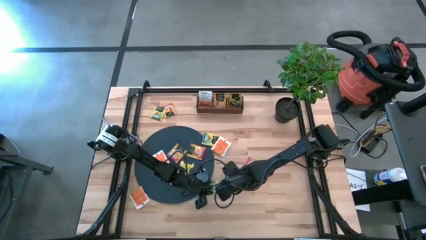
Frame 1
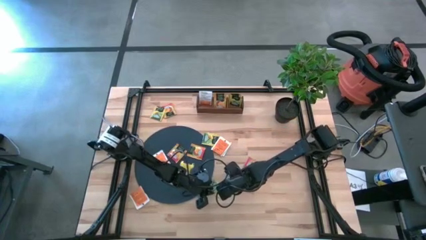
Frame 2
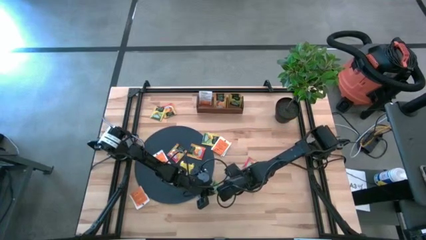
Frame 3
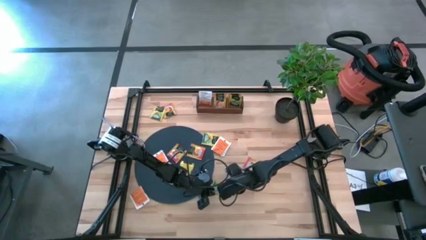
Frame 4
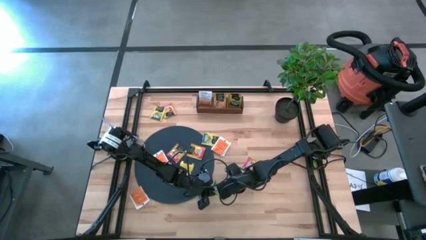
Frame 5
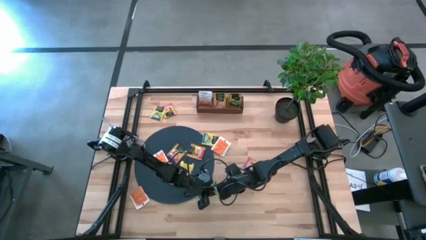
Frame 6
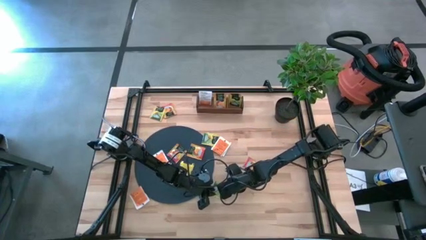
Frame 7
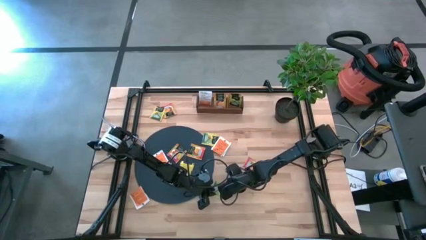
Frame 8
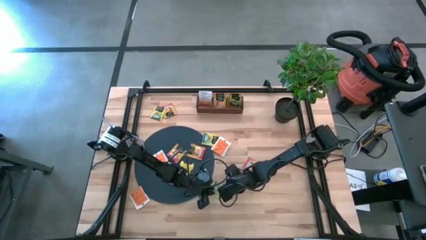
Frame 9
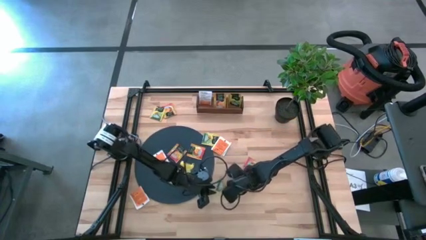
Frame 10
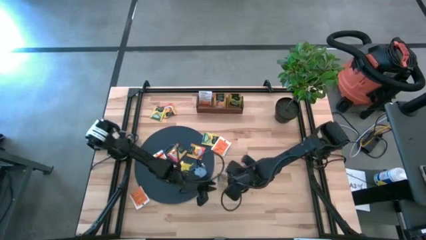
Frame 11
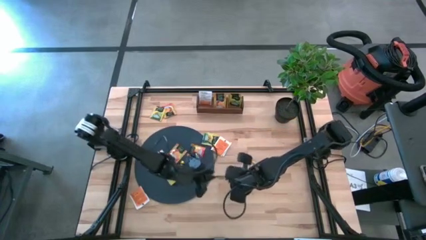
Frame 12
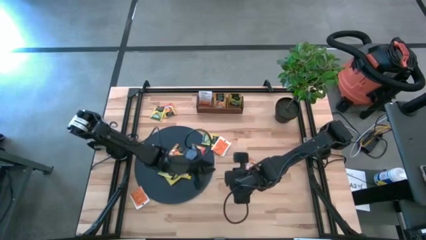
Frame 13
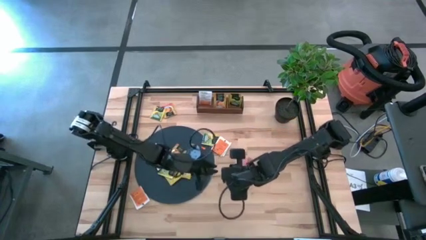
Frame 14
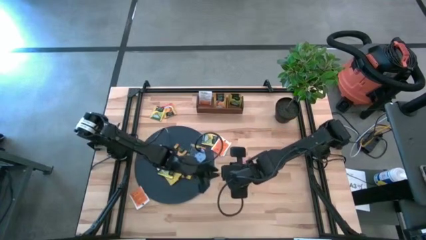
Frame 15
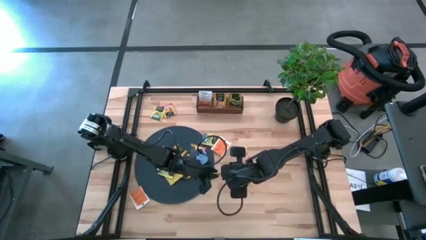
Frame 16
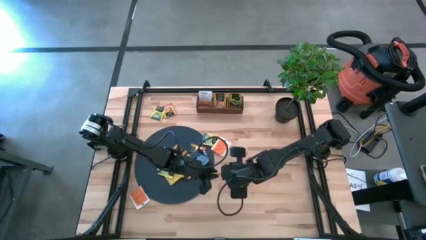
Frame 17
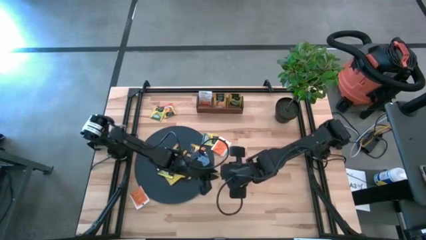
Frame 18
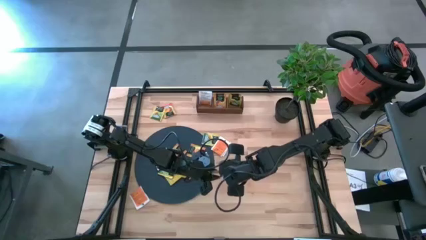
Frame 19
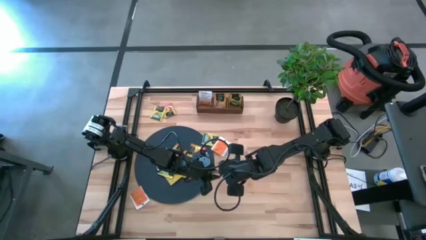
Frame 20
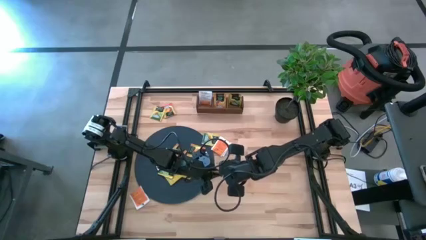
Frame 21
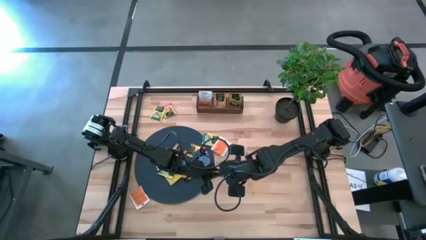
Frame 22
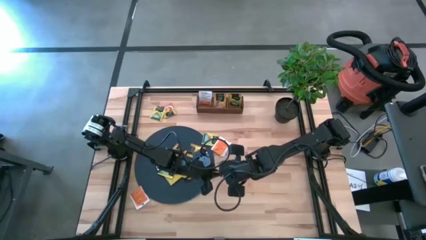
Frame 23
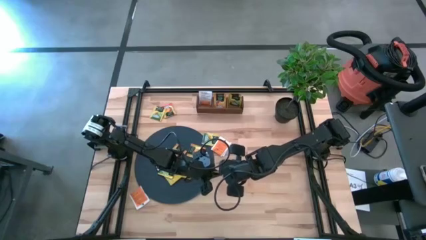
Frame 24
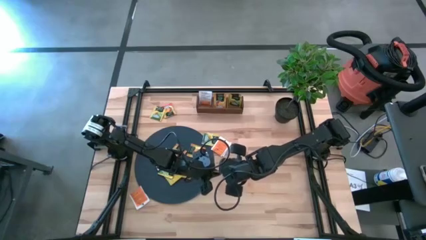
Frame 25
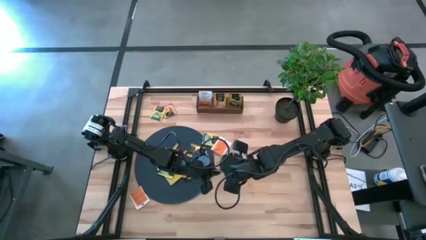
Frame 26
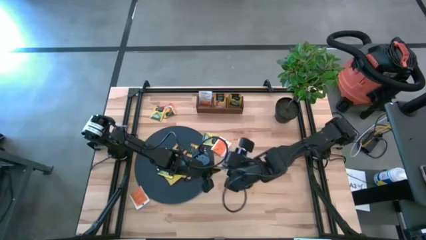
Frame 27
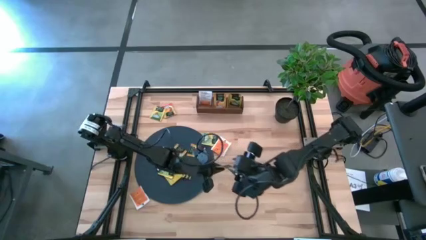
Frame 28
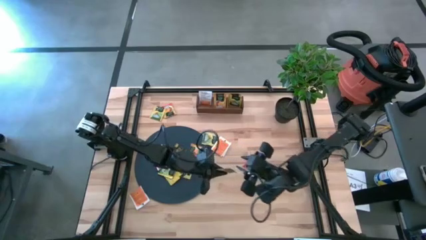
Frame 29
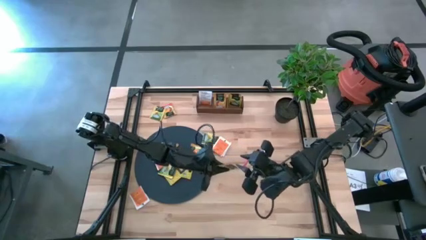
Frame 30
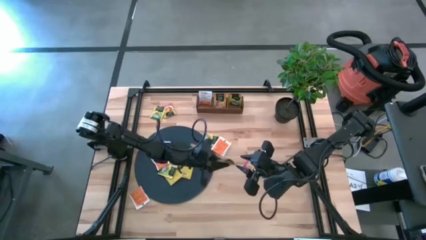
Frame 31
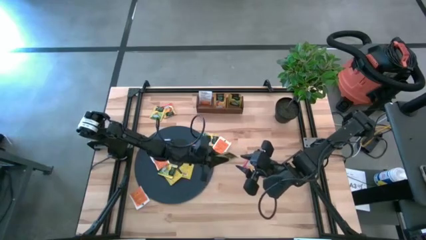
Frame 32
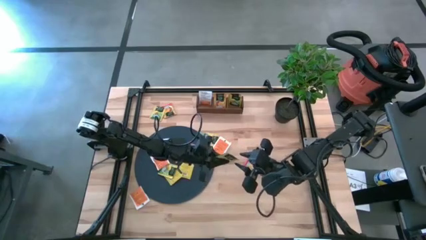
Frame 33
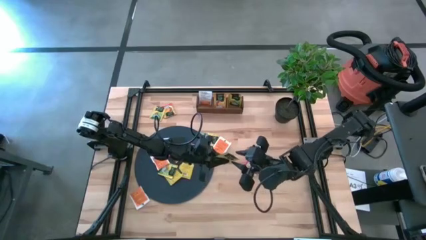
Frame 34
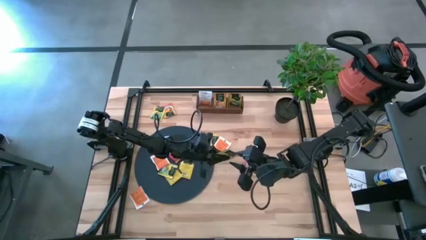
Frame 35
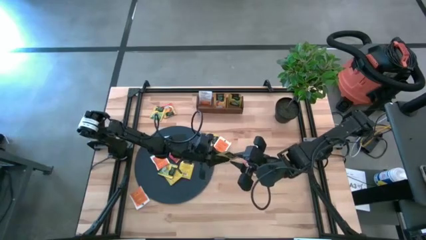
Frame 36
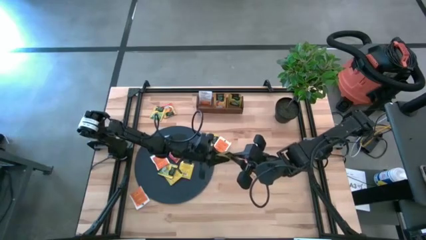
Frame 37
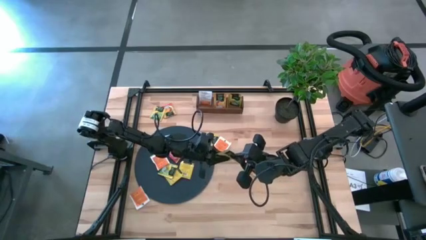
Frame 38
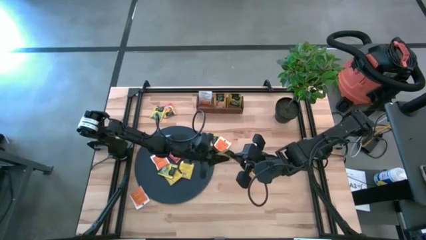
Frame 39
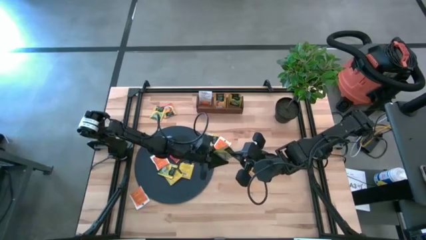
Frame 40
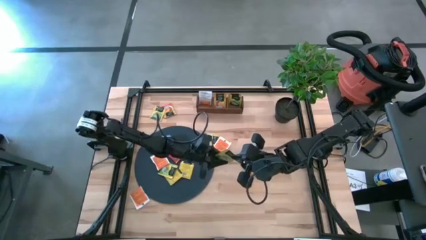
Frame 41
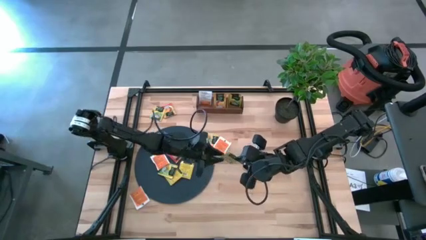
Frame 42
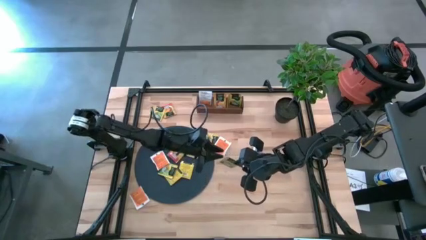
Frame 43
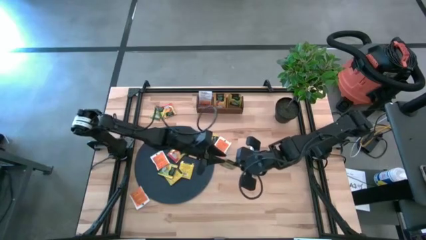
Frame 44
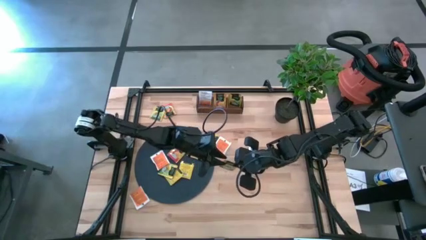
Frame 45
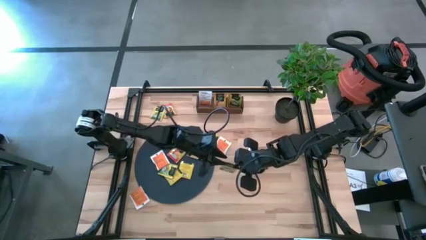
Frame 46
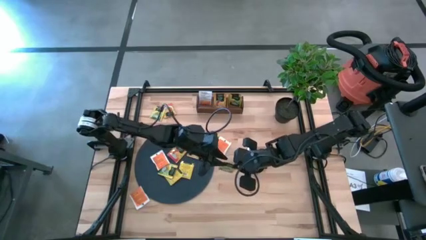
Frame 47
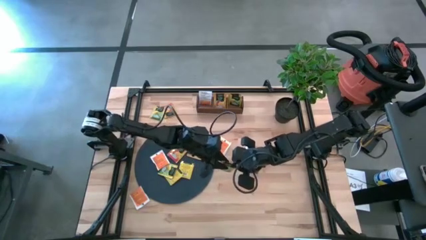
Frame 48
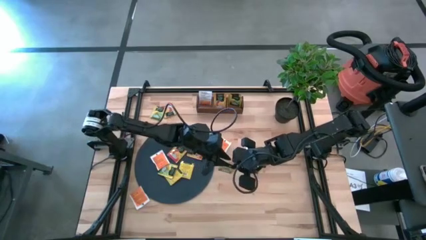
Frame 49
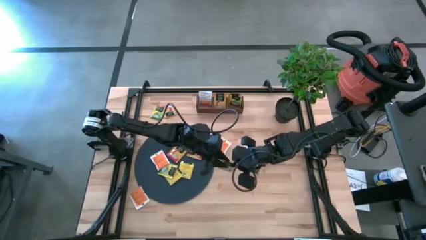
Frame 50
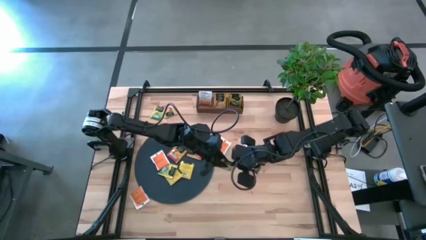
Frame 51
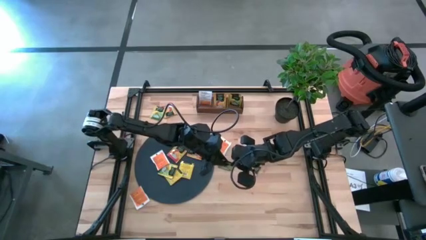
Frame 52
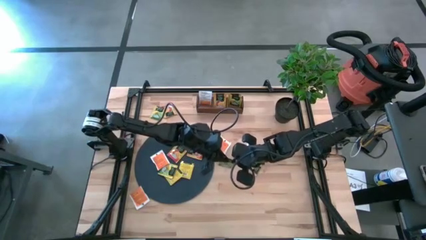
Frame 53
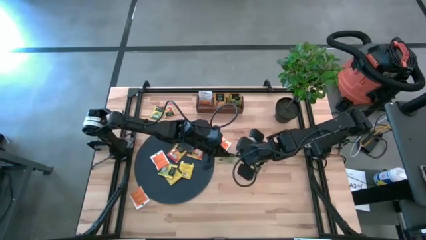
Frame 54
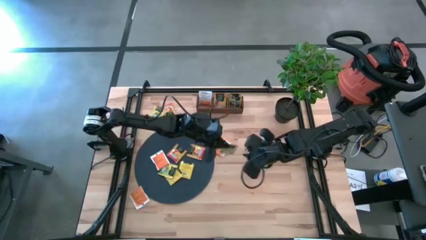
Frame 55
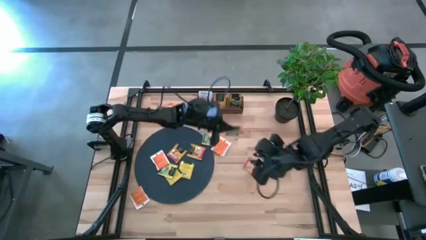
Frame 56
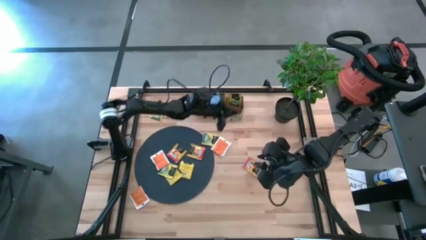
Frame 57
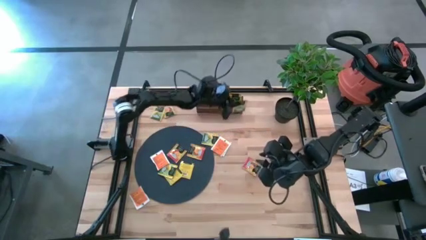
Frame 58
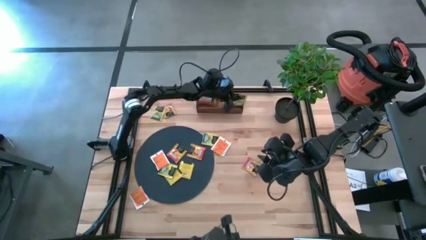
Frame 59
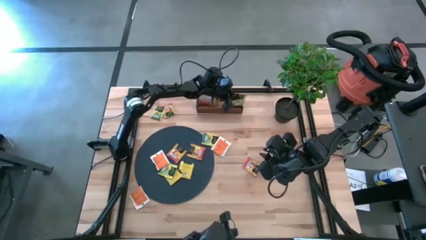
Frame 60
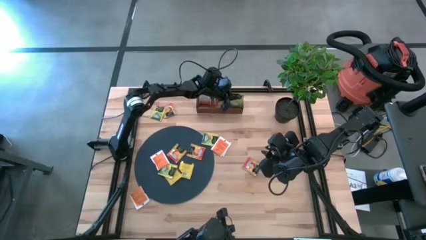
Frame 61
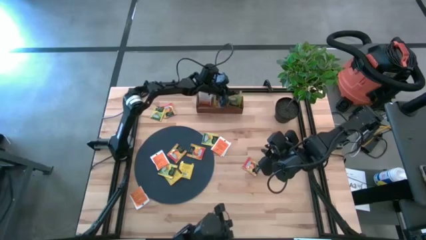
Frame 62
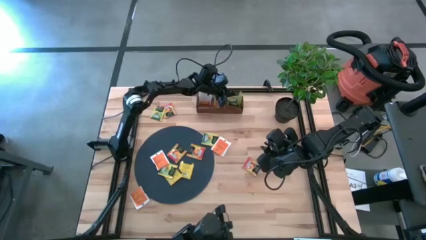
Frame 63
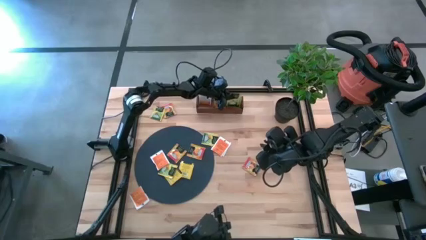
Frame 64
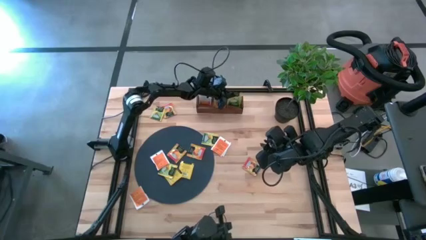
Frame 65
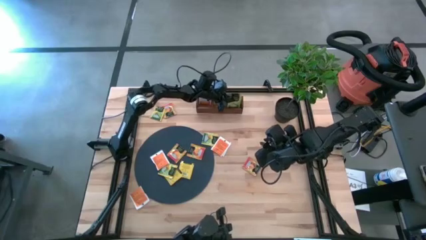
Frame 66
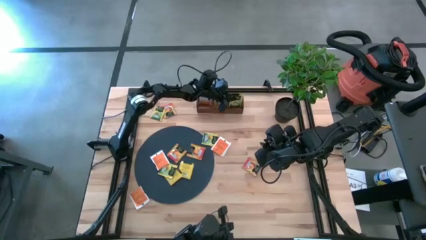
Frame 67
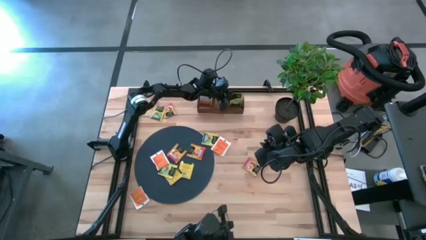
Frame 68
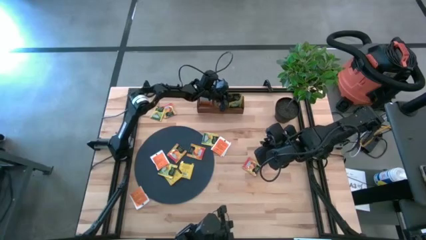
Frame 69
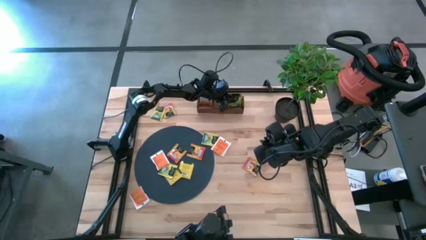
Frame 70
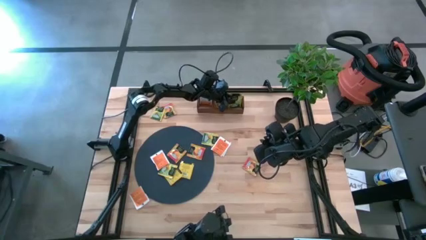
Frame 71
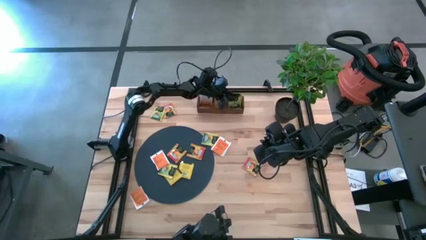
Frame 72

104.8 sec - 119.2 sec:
Task: Pick & Place Tea
Put the green tea bag into the right section of the wooden organizer

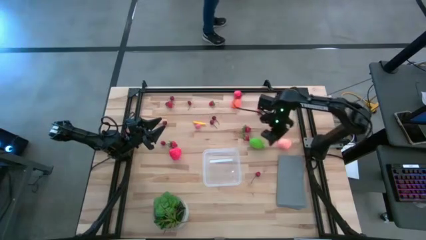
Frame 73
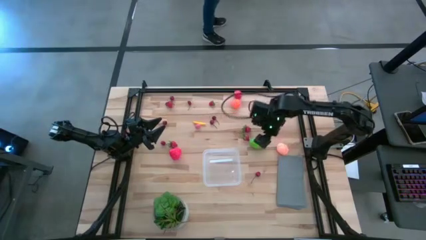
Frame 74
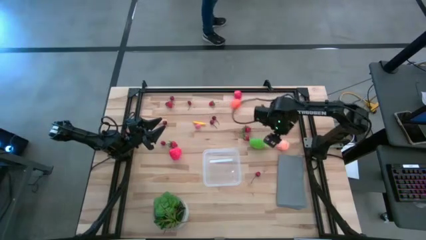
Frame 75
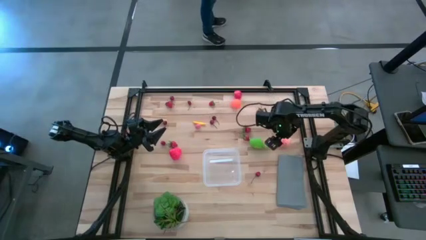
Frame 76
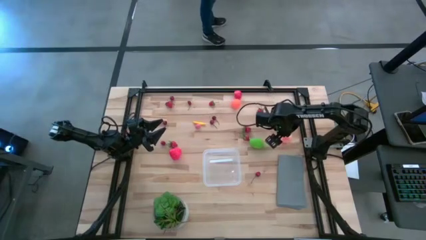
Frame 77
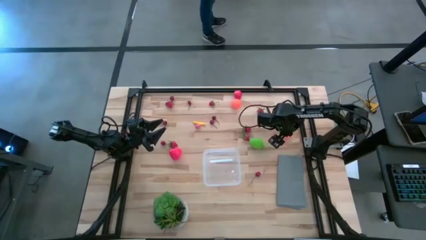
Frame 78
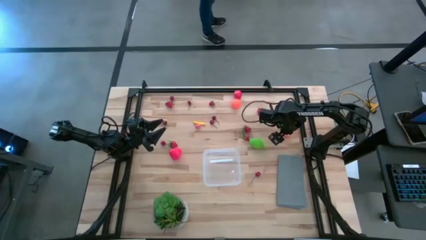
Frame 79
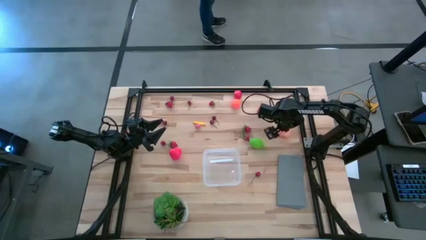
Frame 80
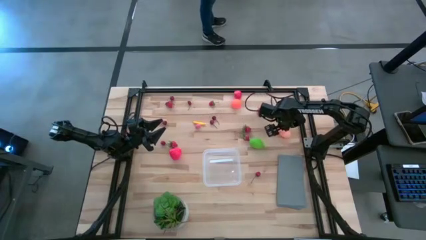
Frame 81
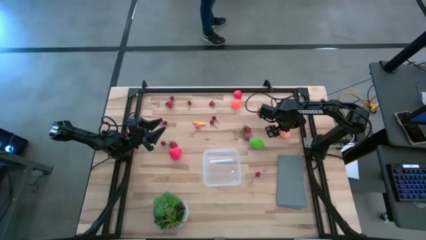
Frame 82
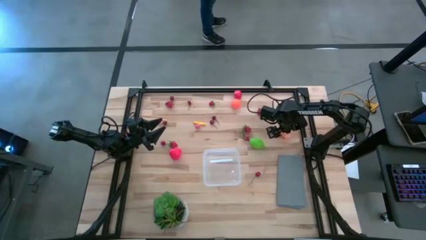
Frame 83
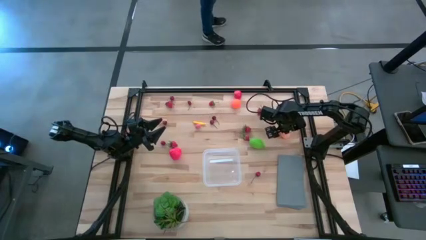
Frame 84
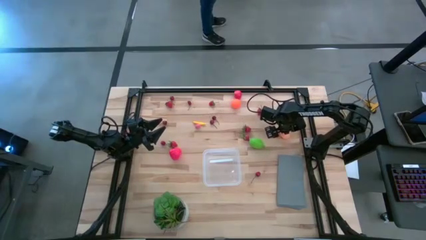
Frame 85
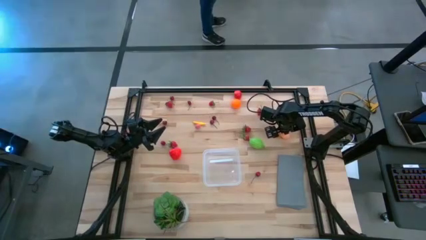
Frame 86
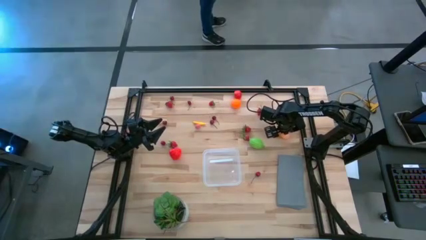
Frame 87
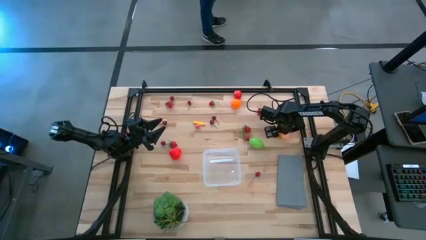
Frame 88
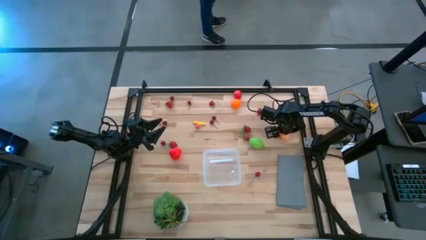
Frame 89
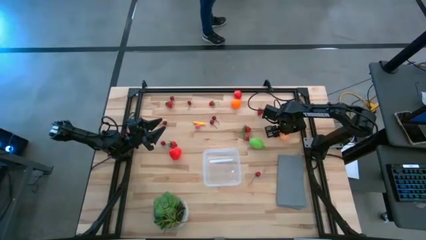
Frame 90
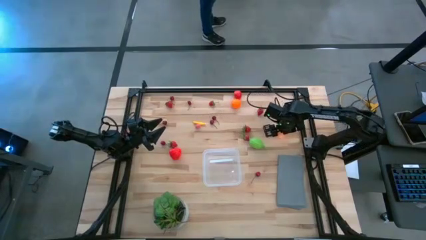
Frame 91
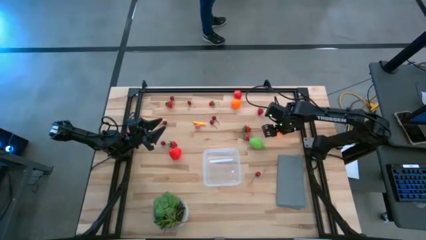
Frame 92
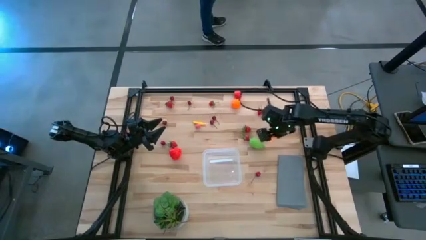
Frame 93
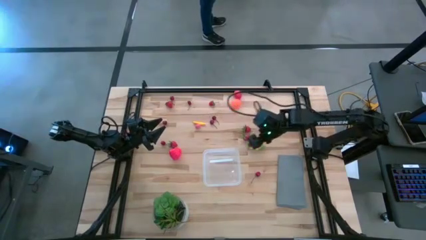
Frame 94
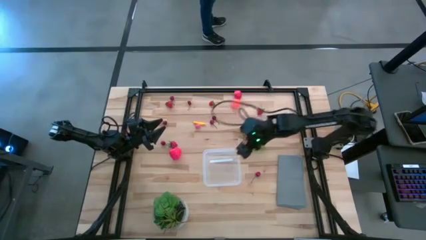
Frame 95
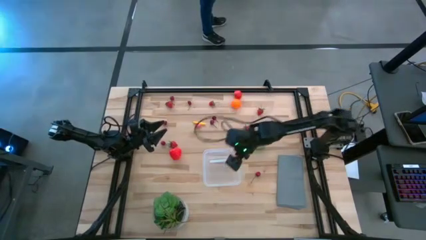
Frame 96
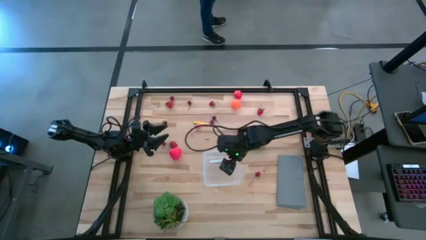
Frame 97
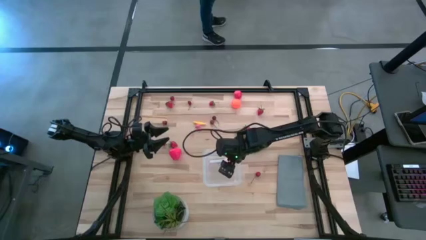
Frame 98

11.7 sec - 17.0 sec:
Task: Pick and placing Produce into tupperware
Put the pink peach into the transparent bin
